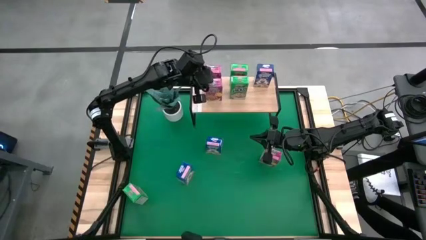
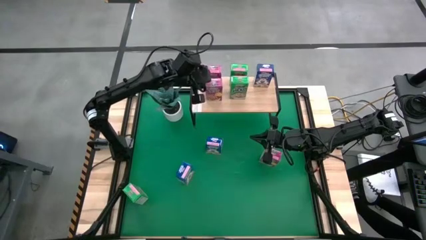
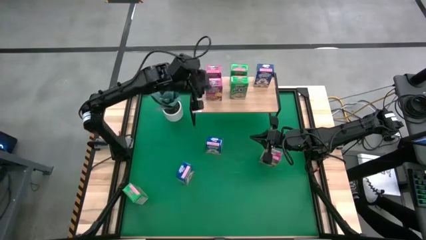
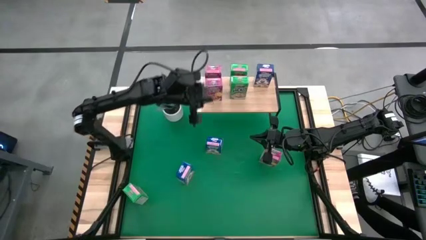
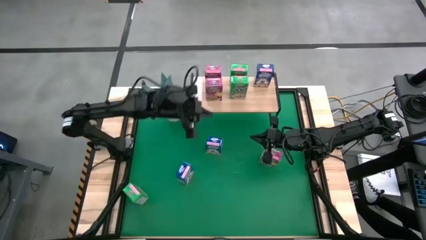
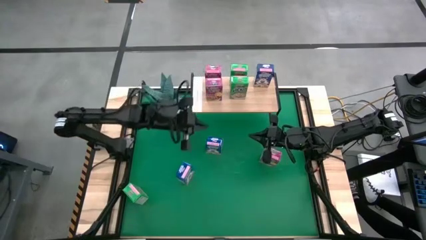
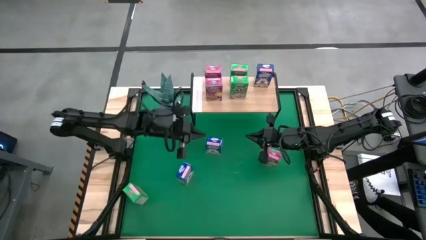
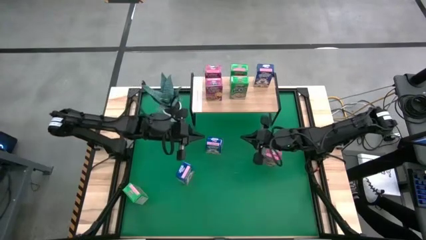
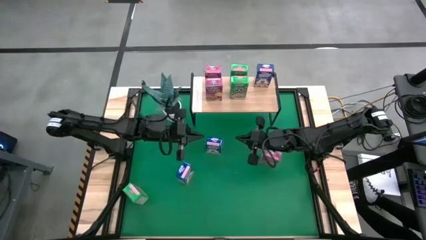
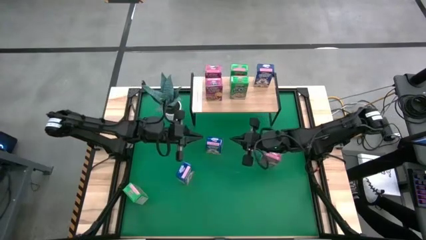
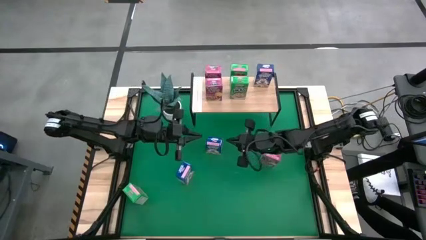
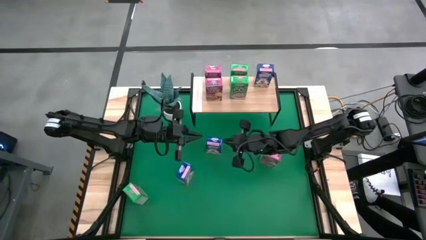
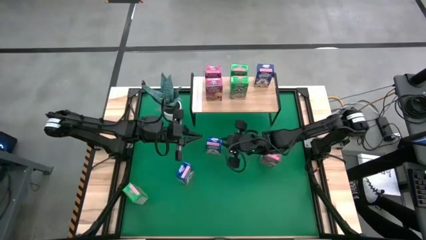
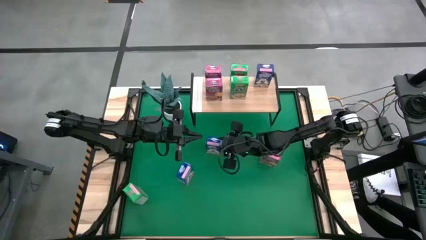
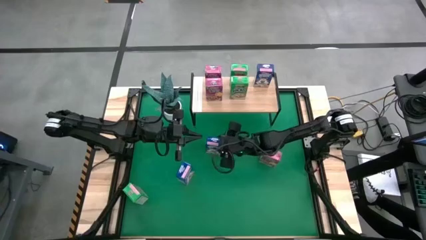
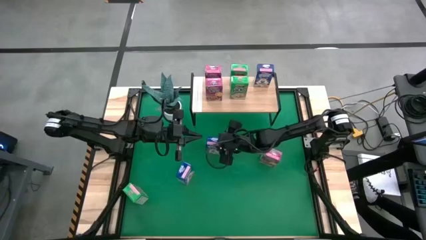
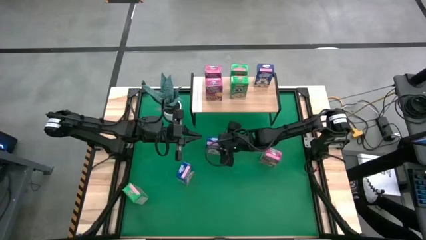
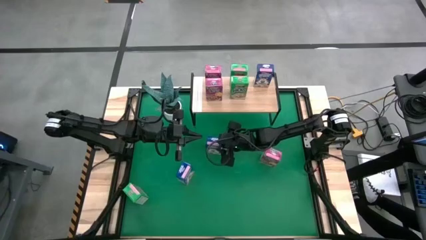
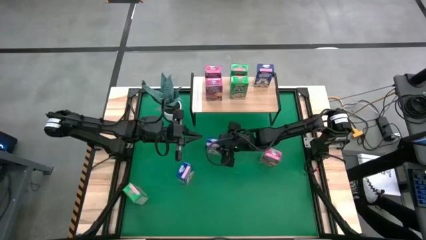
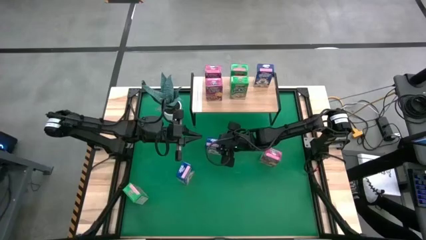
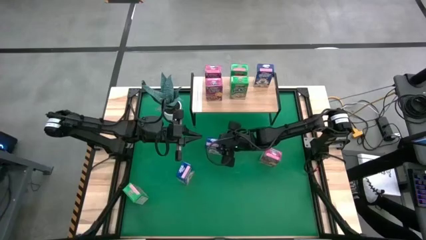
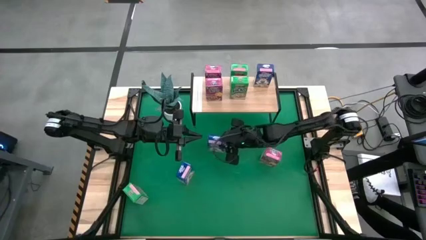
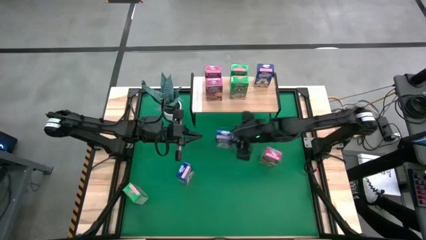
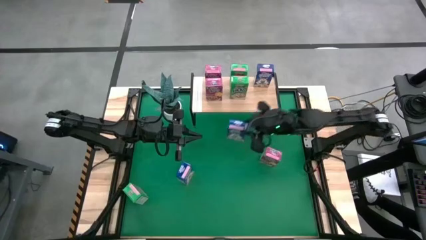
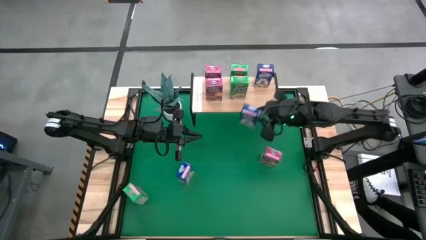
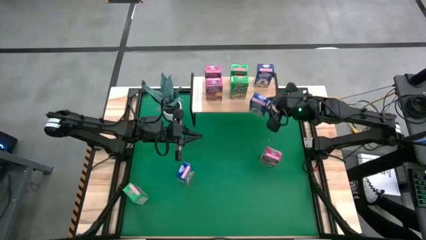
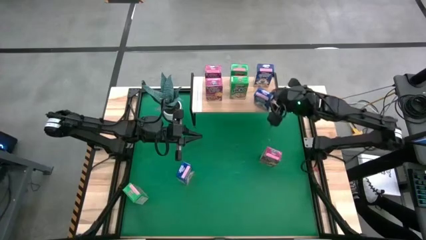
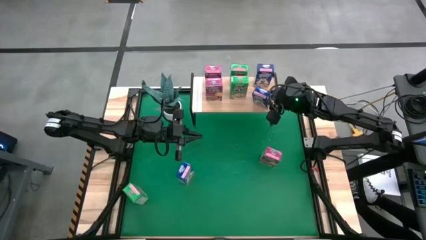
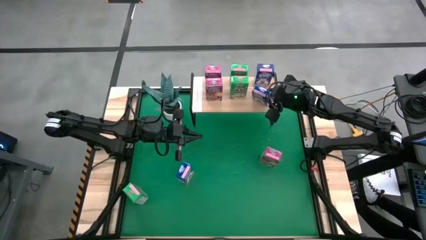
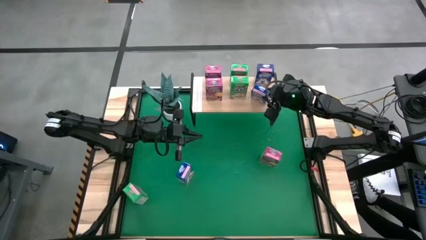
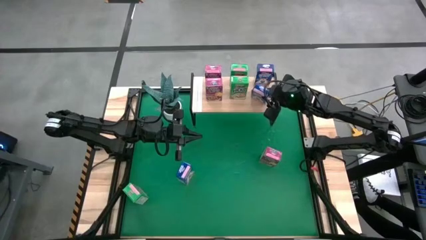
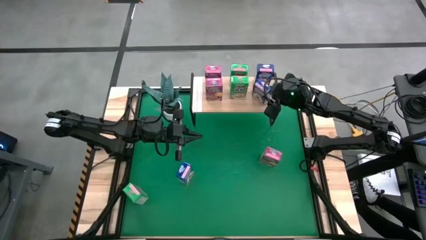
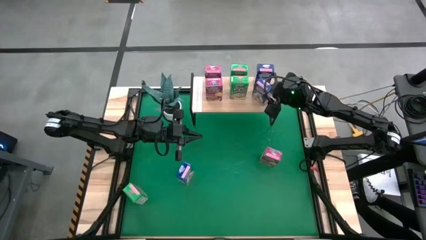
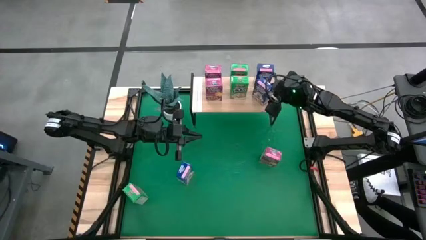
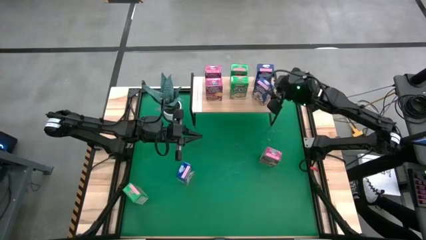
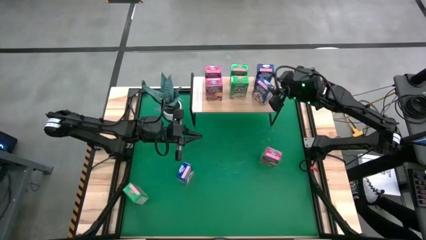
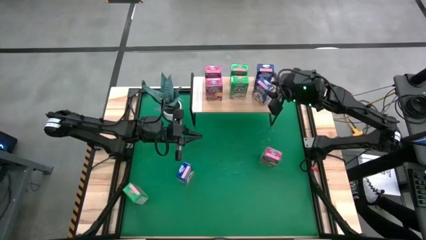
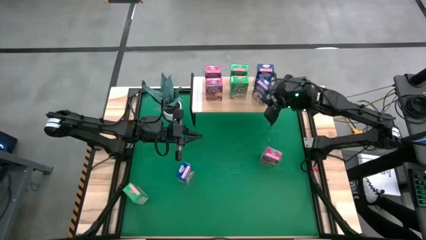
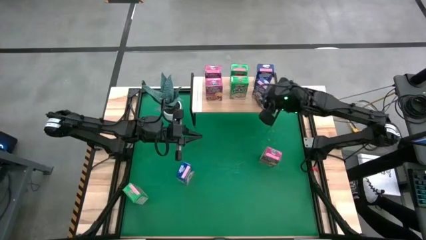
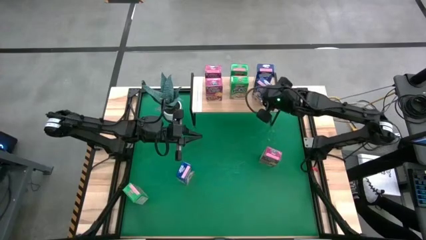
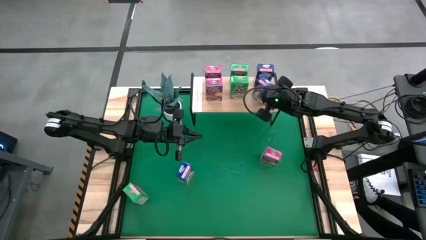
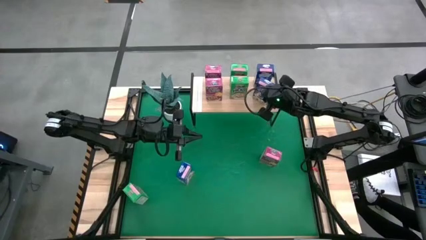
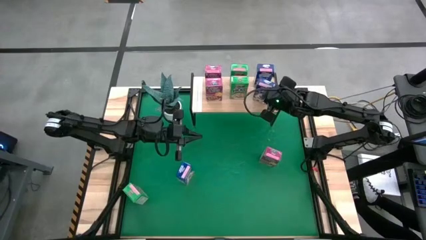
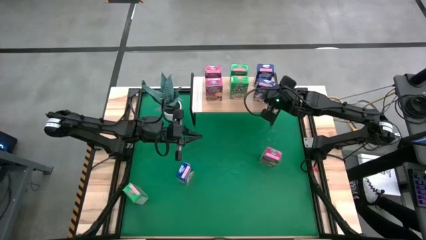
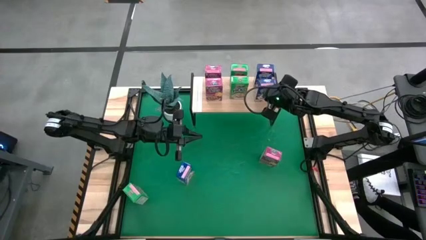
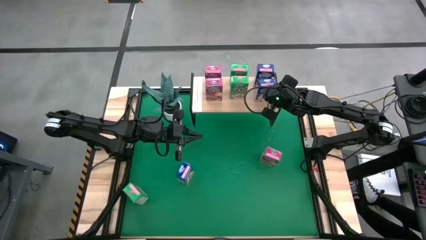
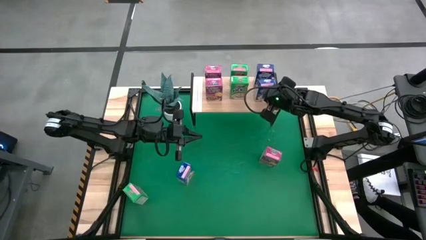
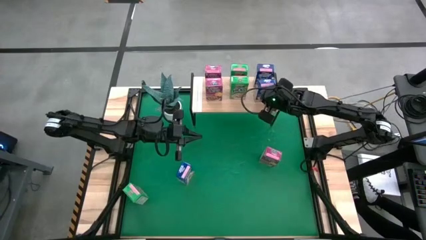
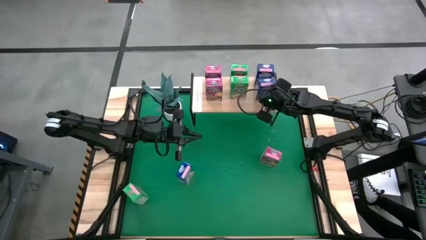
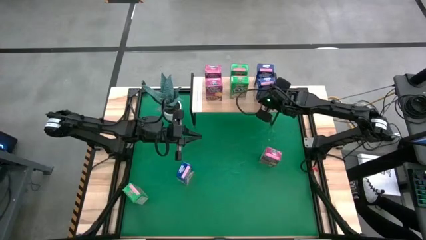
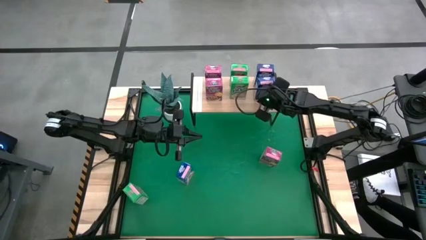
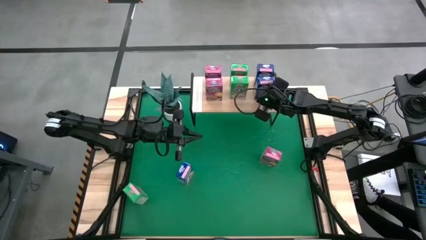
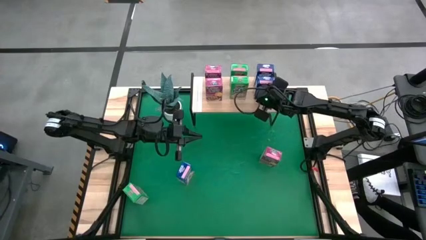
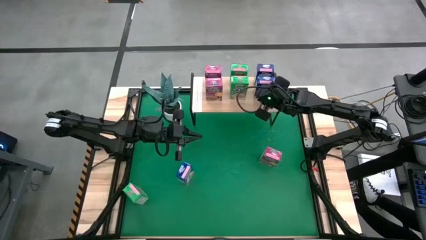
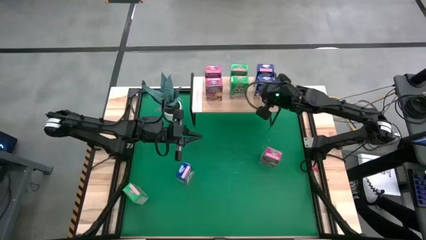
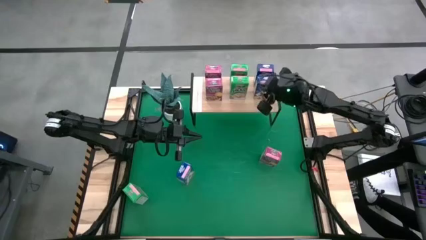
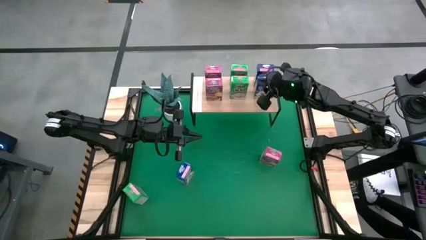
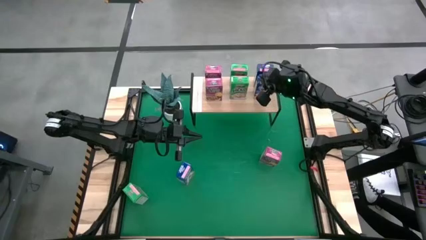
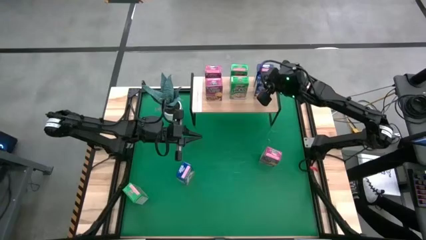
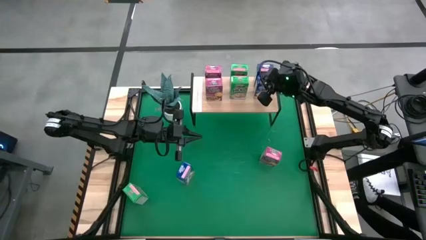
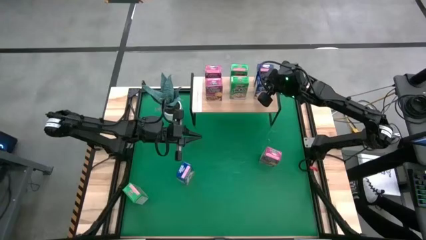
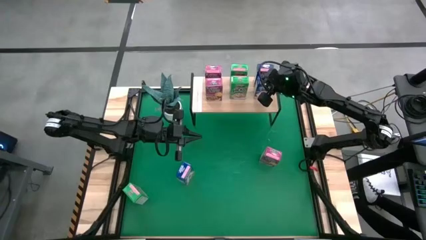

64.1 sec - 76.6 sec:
Task: Stack cereal on shelf
Put the top blue cereal box aligned with the other blue cereal box on the shelf
